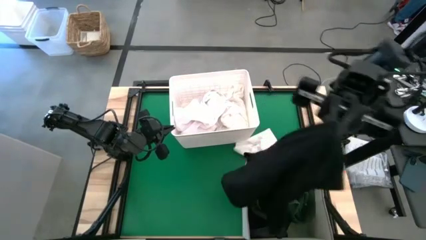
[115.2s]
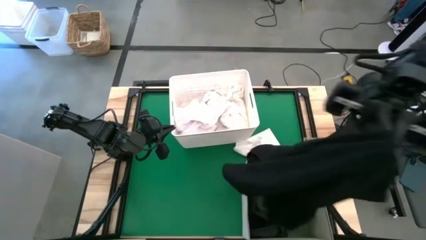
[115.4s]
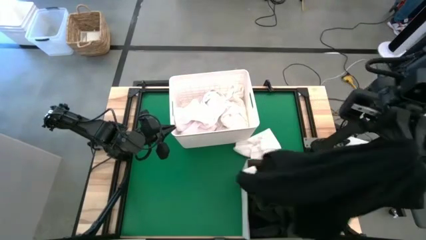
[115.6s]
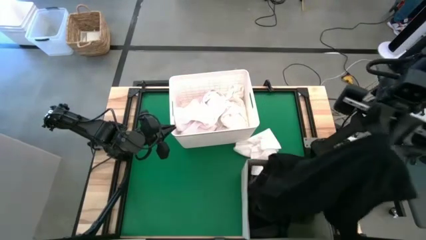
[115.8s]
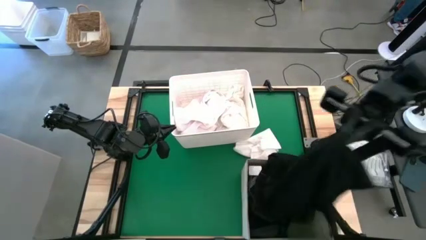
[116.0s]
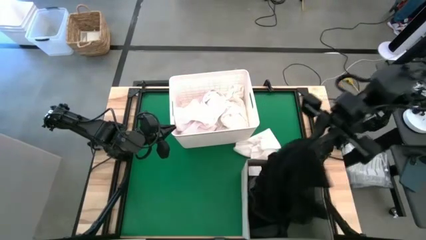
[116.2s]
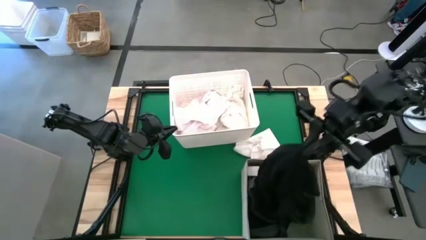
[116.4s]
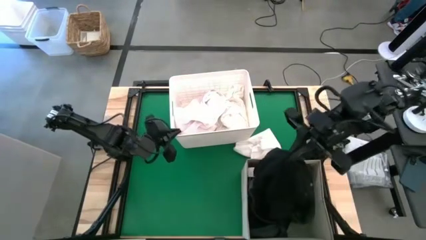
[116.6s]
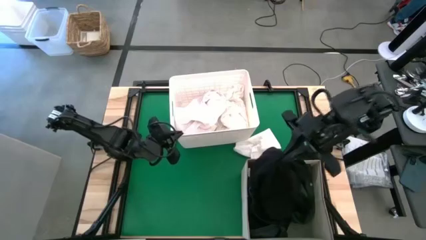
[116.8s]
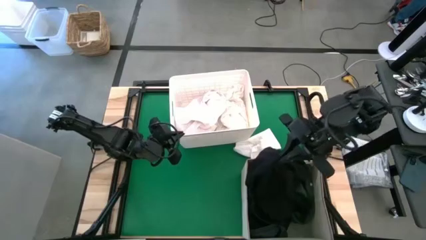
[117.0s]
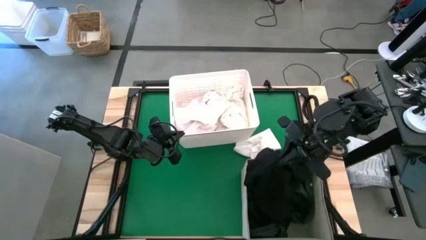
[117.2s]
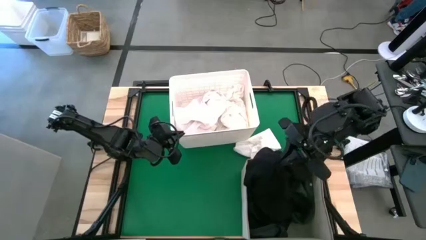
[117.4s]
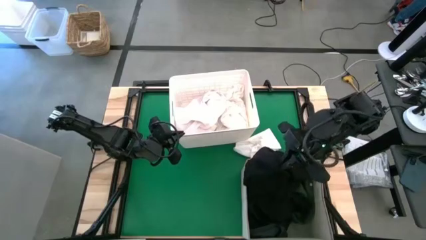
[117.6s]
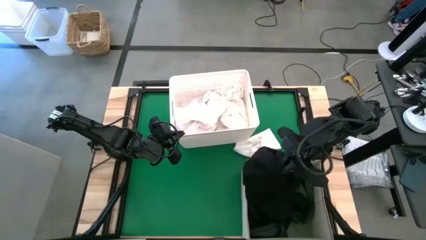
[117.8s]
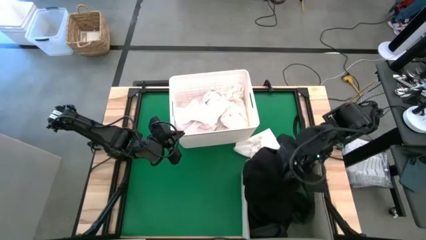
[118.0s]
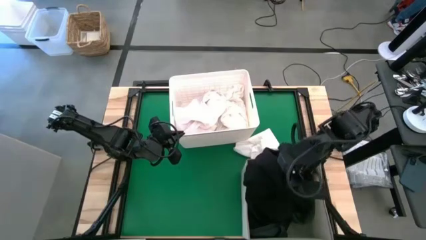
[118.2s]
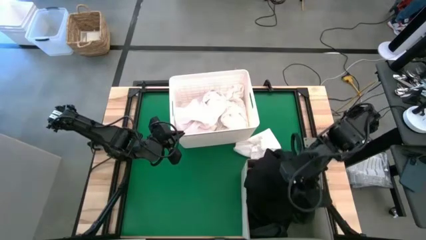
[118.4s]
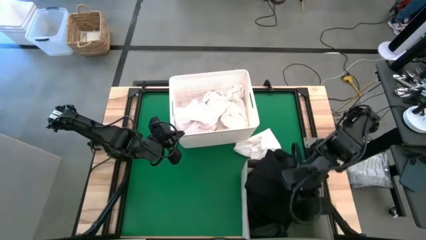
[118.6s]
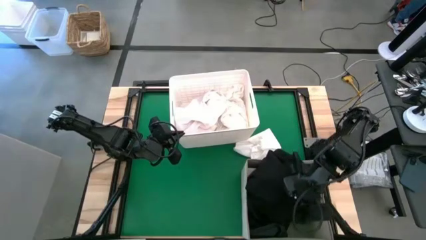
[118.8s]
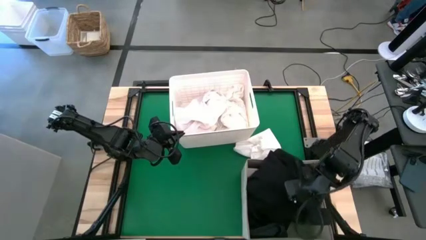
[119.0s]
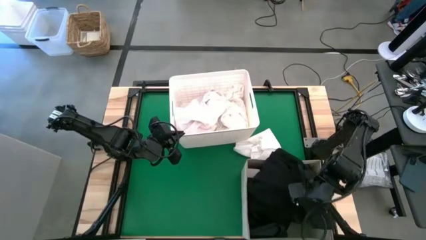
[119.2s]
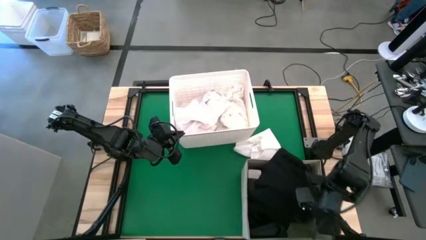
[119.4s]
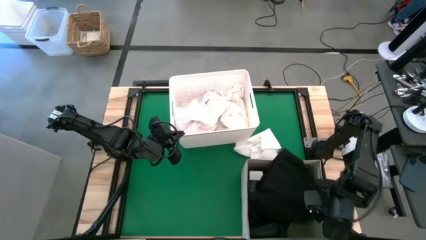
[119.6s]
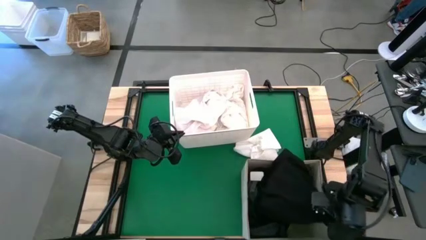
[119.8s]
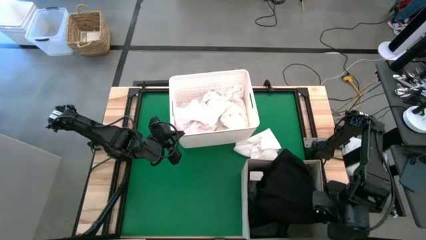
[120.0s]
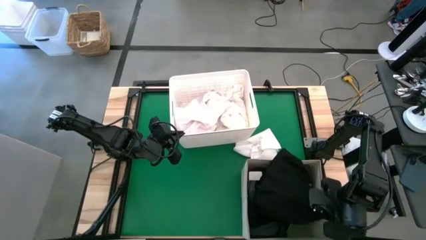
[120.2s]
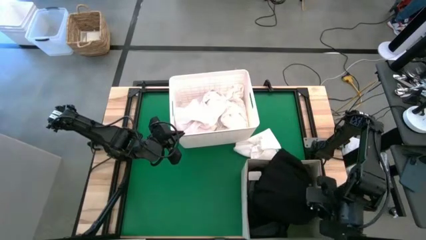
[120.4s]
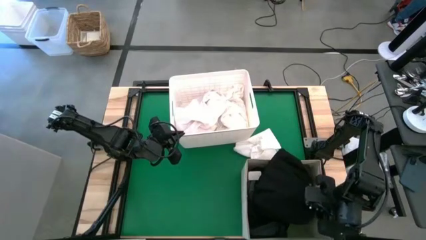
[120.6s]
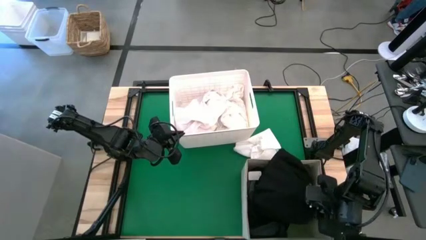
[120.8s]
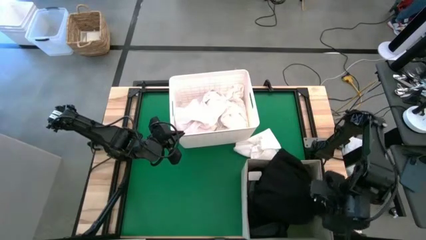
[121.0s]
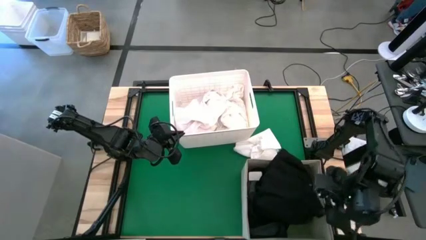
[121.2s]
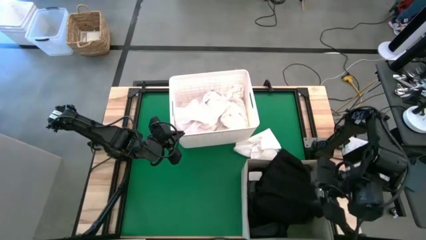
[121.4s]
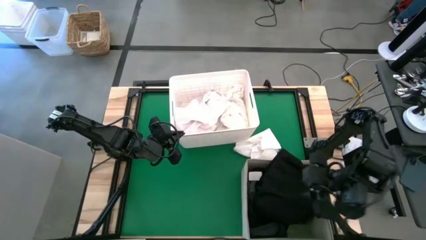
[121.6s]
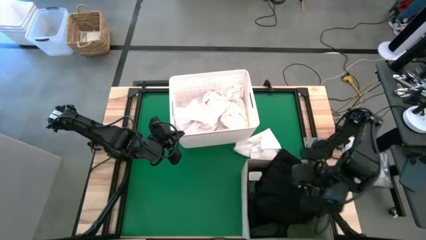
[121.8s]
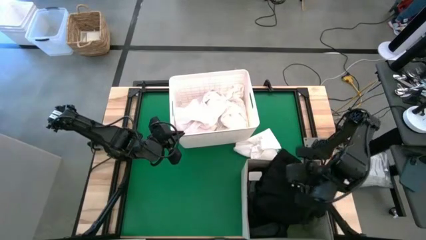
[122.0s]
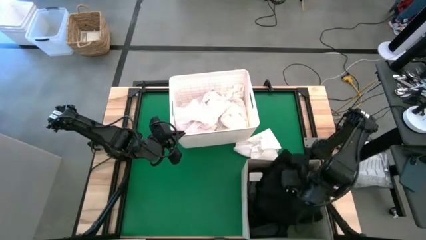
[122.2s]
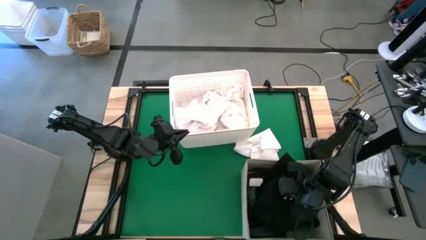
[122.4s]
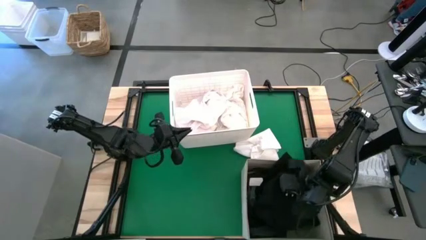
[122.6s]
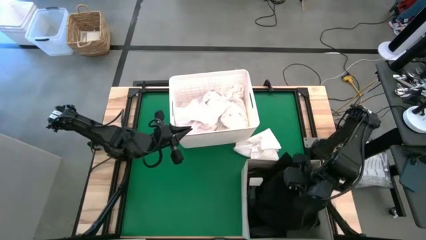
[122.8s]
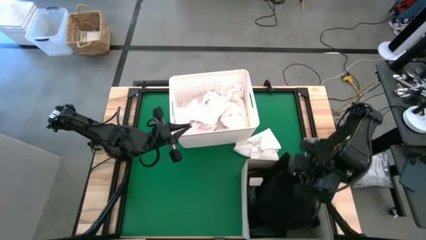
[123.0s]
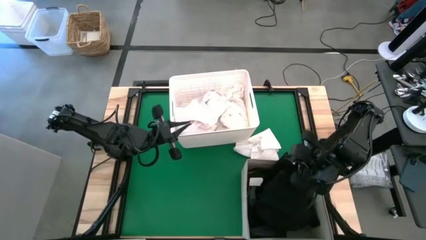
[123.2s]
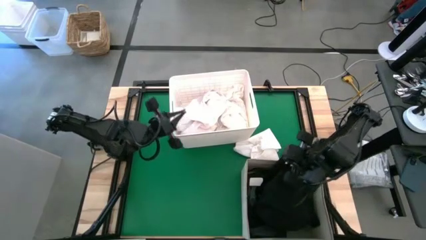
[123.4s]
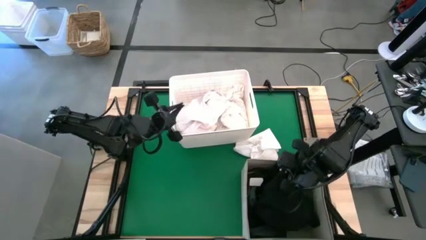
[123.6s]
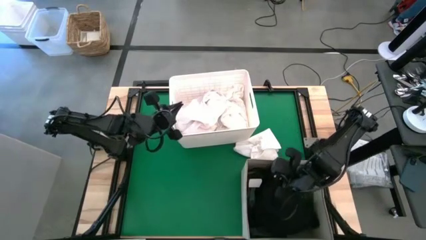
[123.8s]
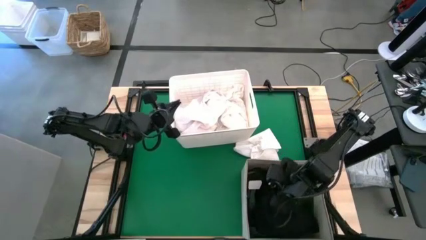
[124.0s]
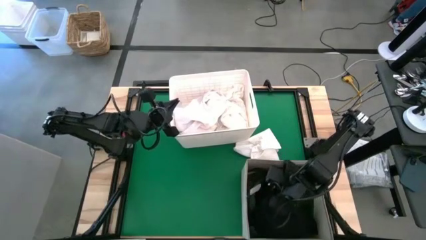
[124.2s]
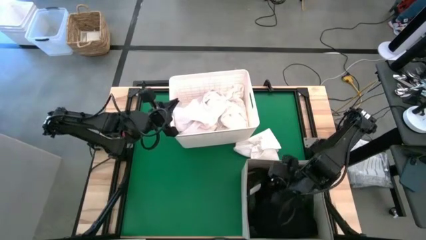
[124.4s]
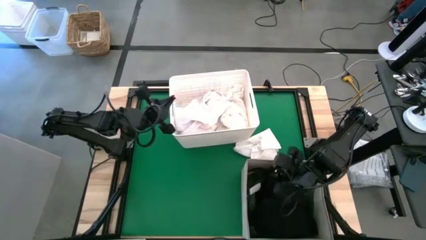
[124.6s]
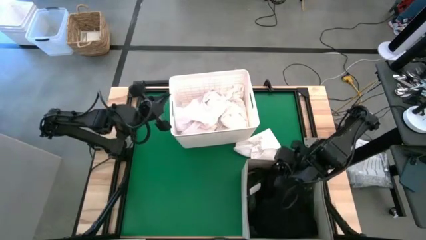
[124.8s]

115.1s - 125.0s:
Put the black cloth into the white fabric storage bin
